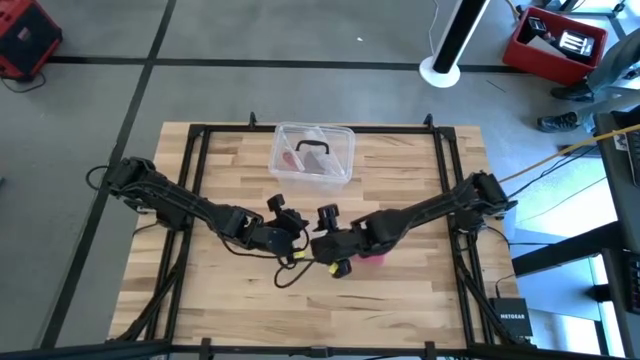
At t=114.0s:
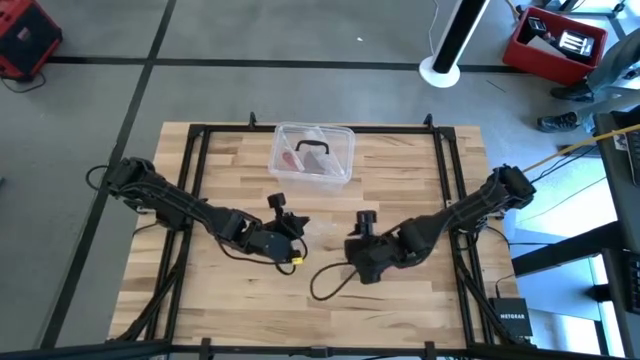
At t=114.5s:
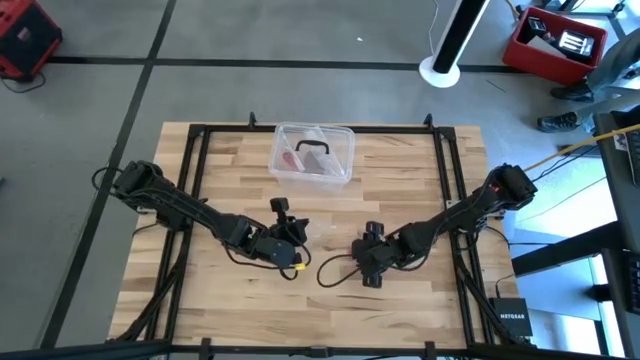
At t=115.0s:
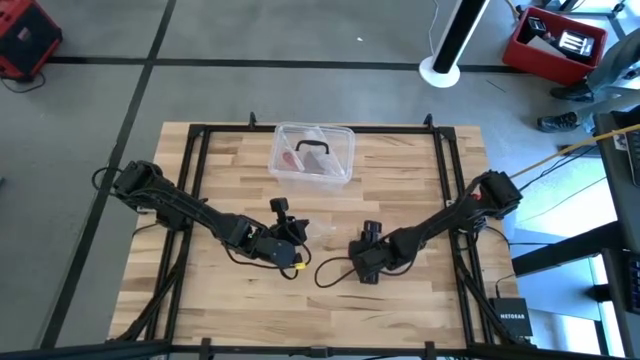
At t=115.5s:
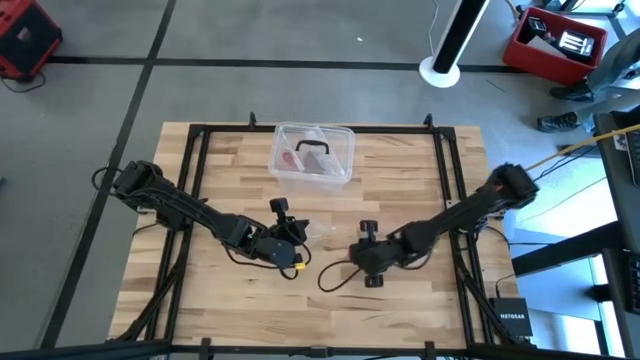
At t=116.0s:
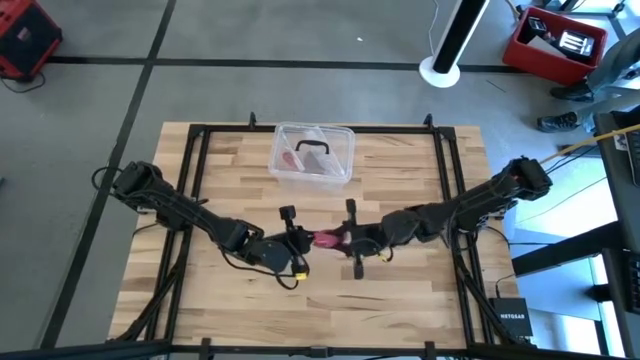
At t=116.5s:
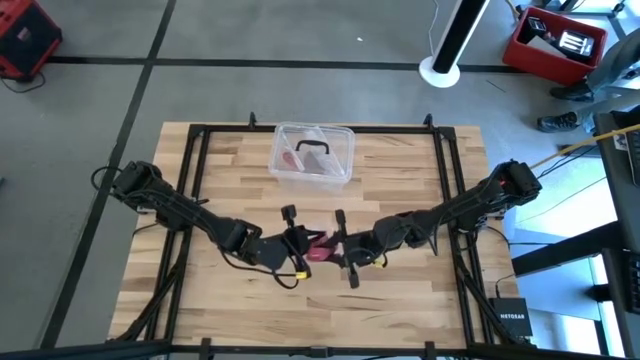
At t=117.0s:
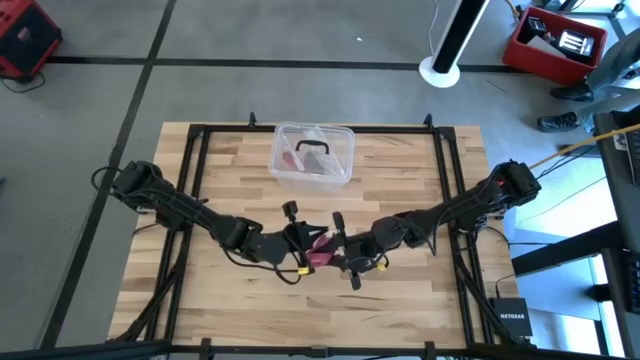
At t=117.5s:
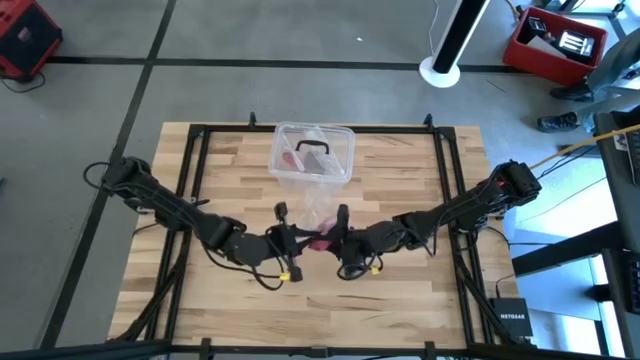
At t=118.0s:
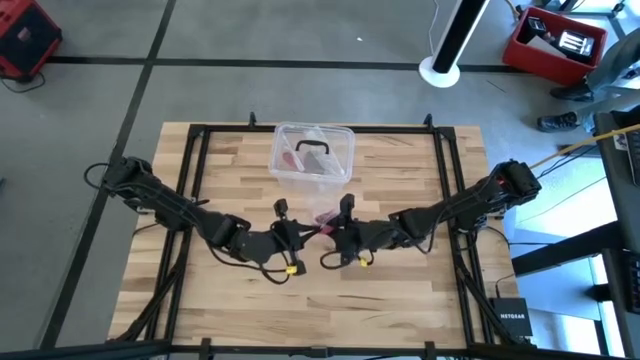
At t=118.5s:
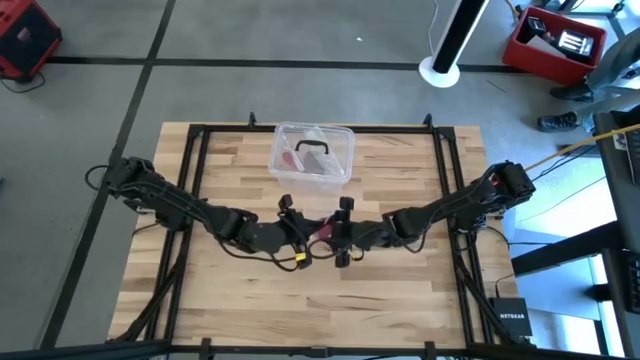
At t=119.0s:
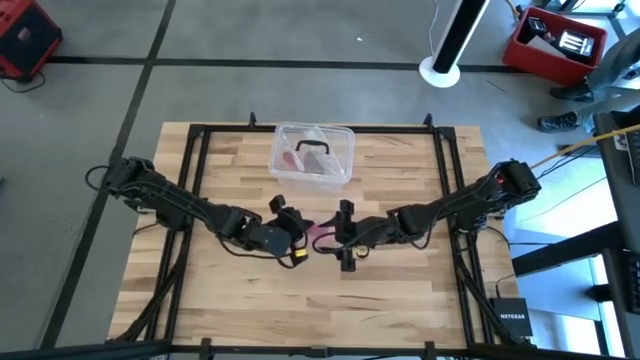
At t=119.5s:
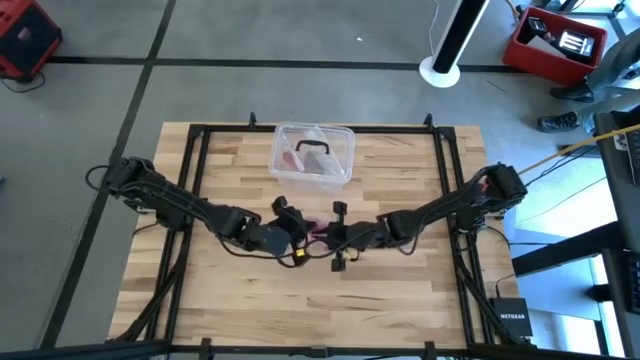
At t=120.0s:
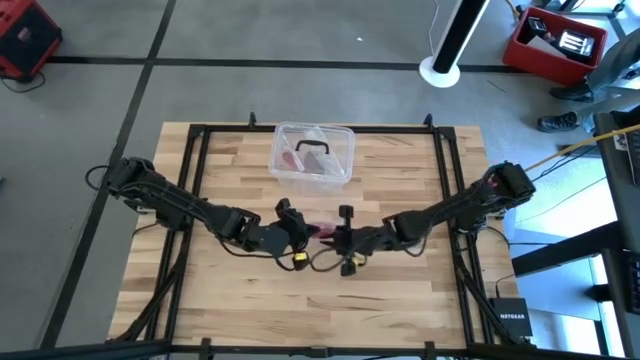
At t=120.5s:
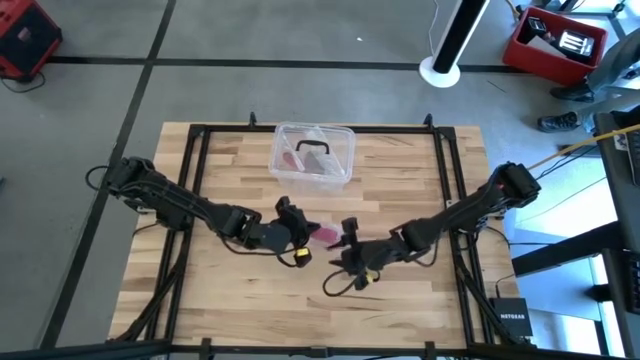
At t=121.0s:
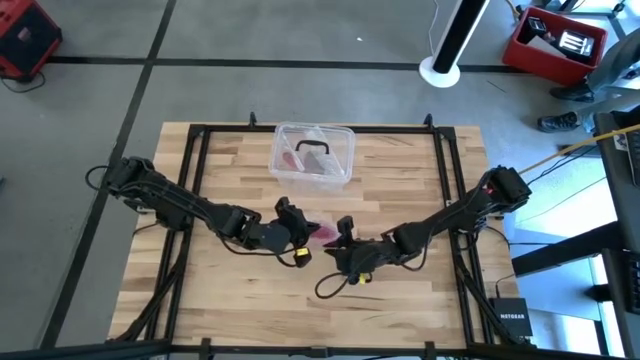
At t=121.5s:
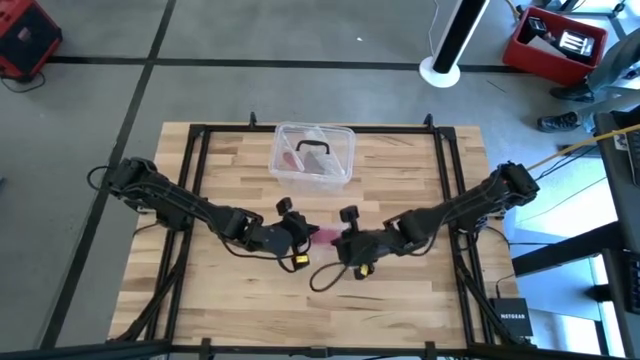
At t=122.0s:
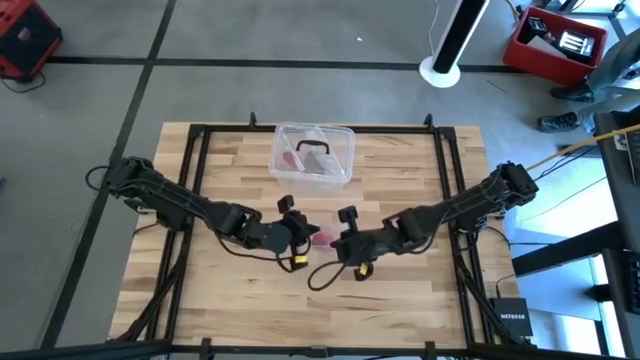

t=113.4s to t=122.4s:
Task: Roll bandage
Put the pink bandage into the transparent zip bag

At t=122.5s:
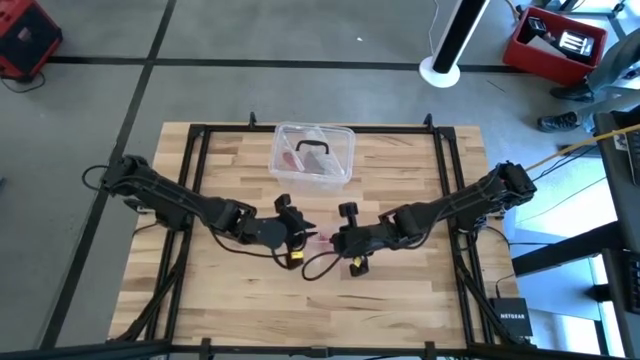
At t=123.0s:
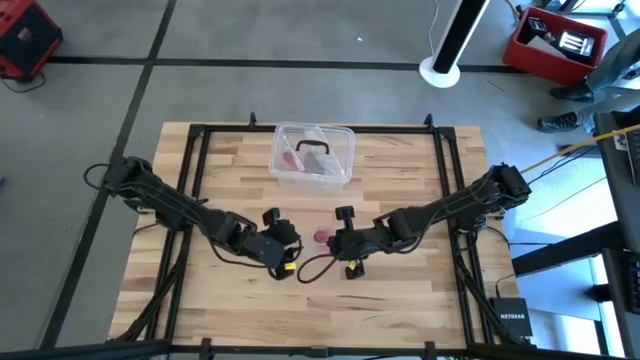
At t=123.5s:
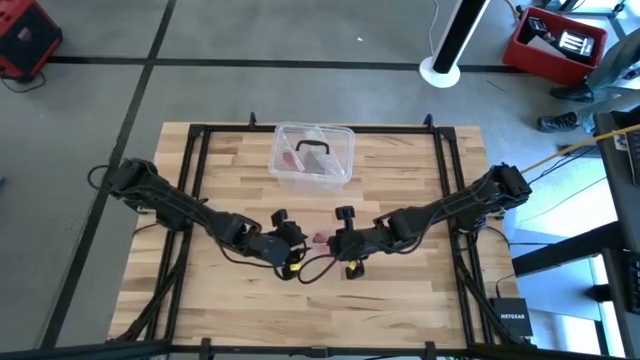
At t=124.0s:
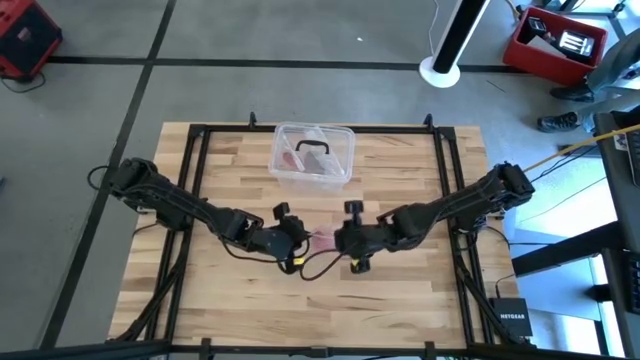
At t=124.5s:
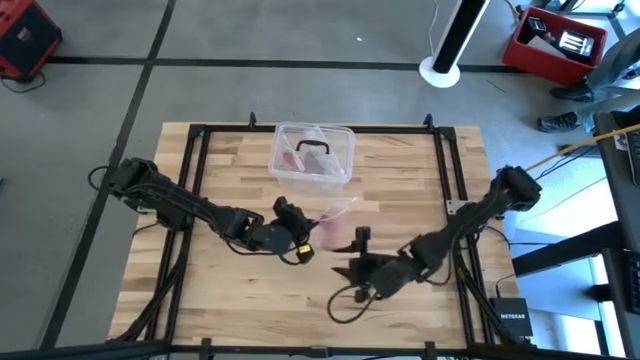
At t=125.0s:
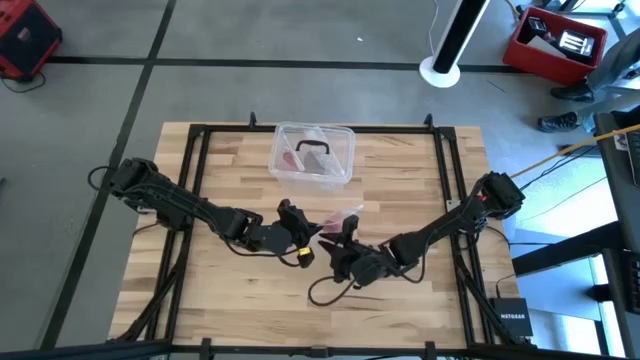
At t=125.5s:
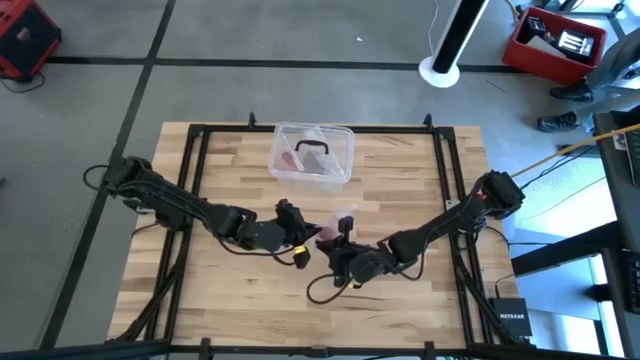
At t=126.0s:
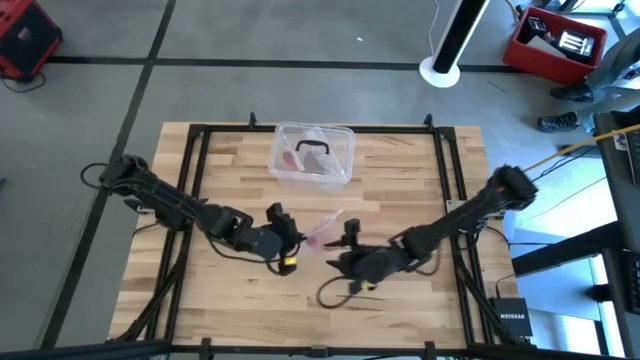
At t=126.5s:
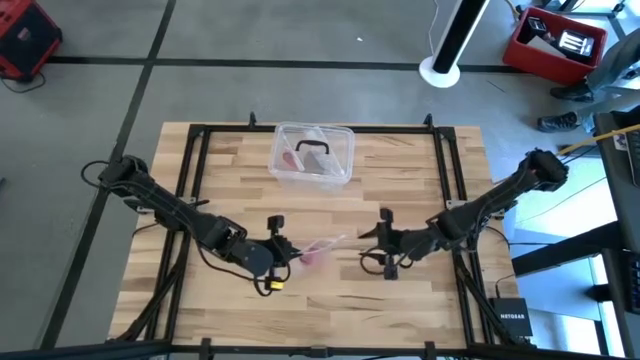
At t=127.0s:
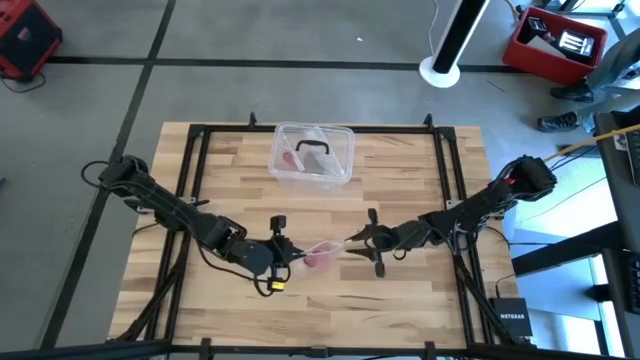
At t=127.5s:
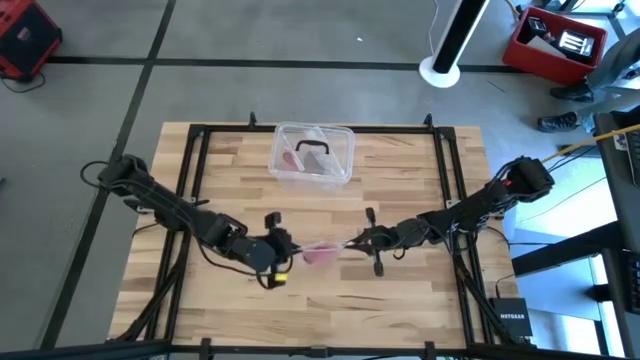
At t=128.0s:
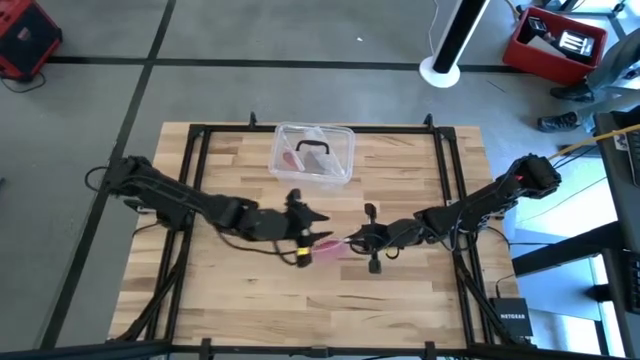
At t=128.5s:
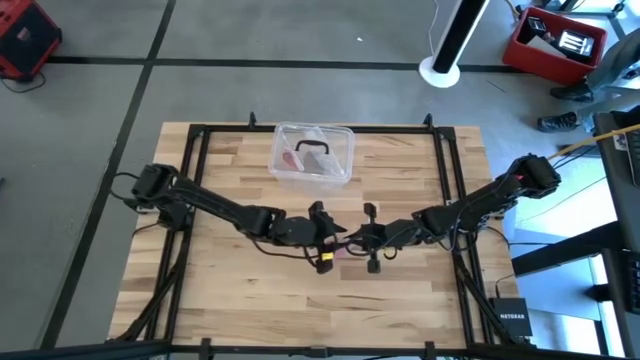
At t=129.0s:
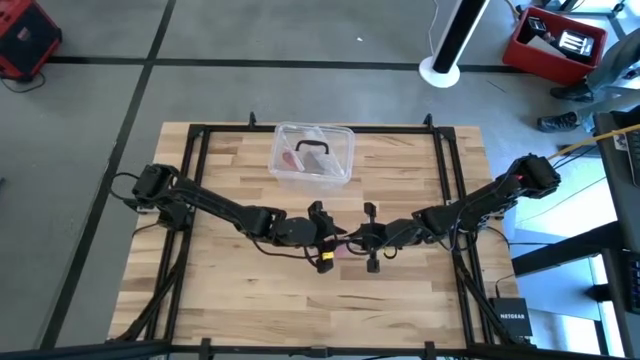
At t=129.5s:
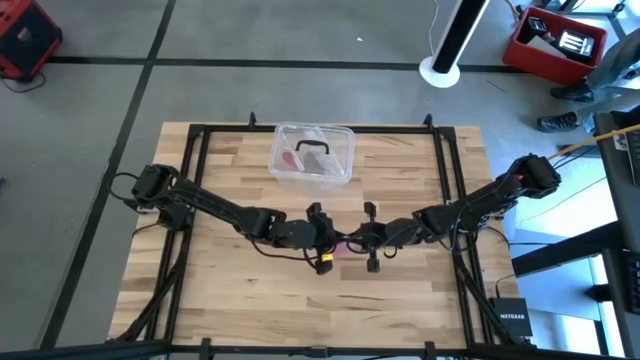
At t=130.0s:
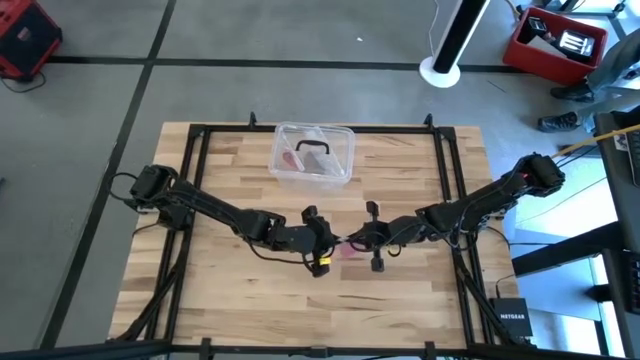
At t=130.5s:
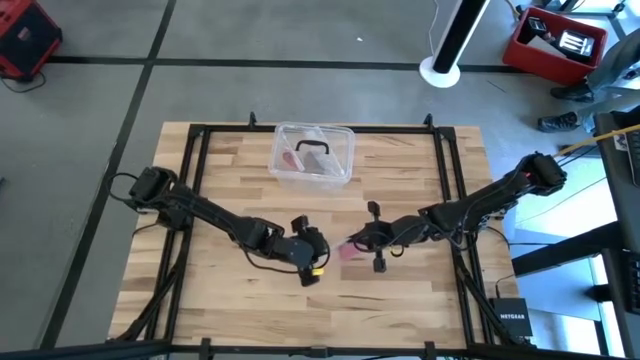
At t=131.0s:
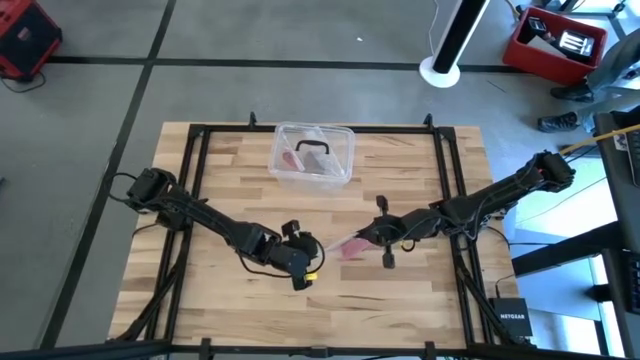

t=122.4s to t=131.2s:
Close the transparent zip bag

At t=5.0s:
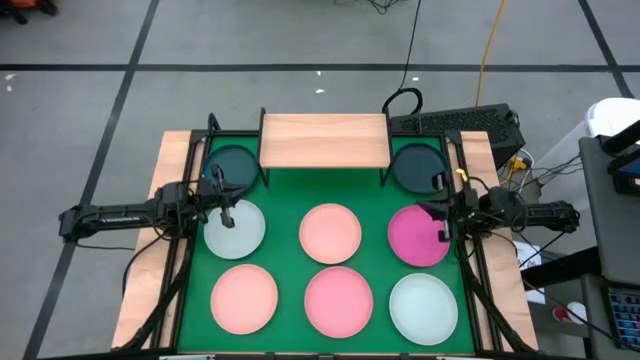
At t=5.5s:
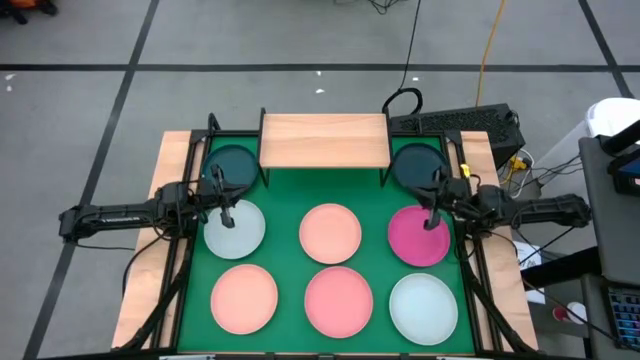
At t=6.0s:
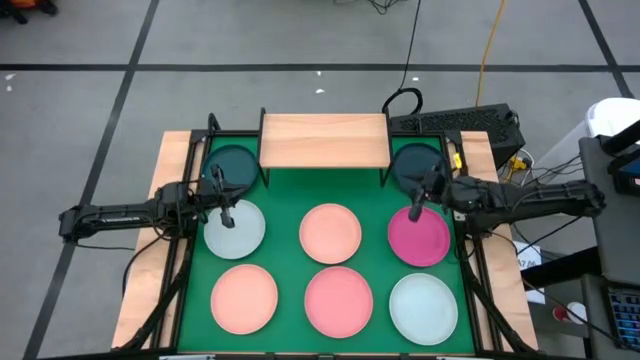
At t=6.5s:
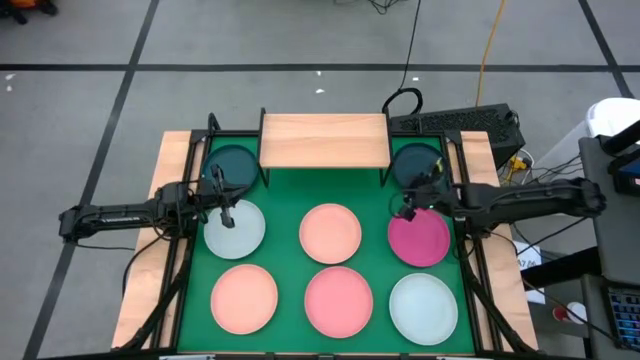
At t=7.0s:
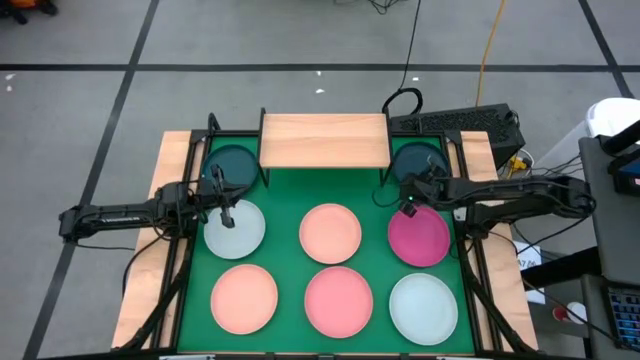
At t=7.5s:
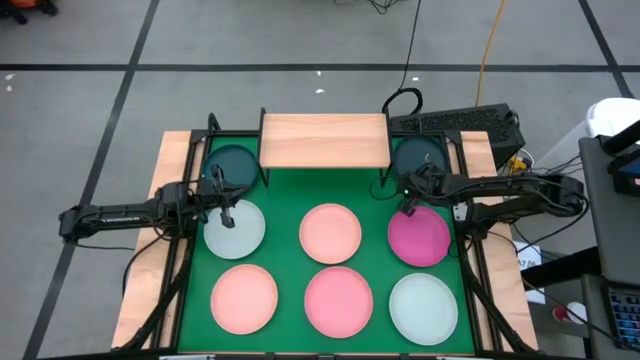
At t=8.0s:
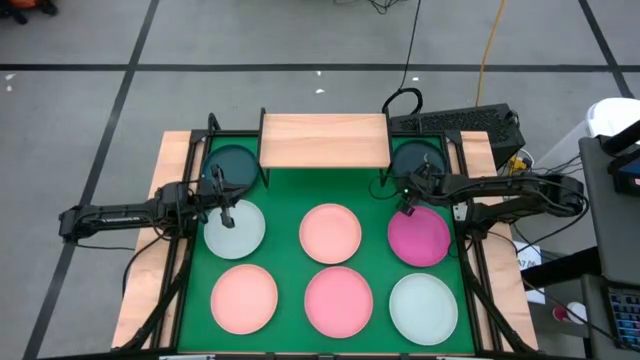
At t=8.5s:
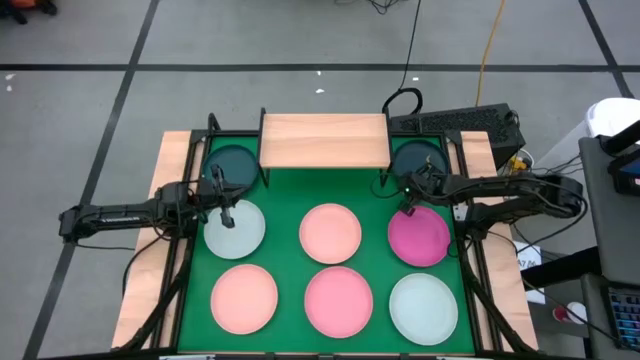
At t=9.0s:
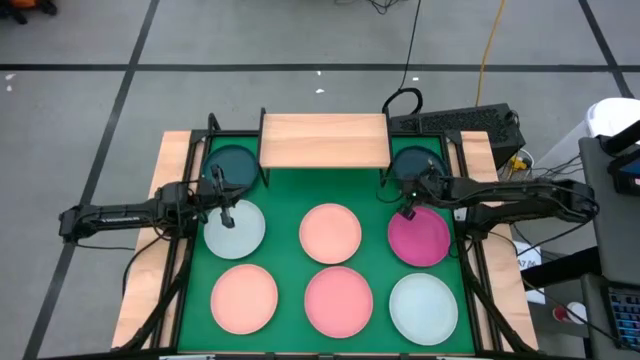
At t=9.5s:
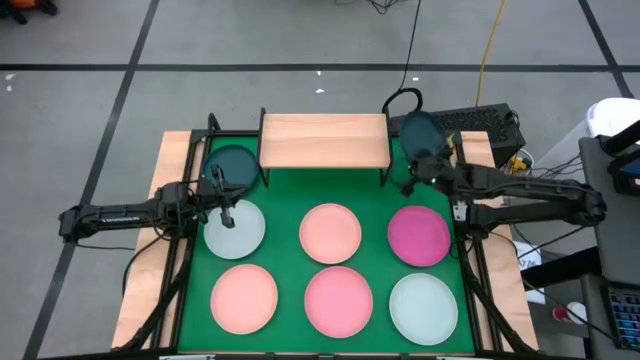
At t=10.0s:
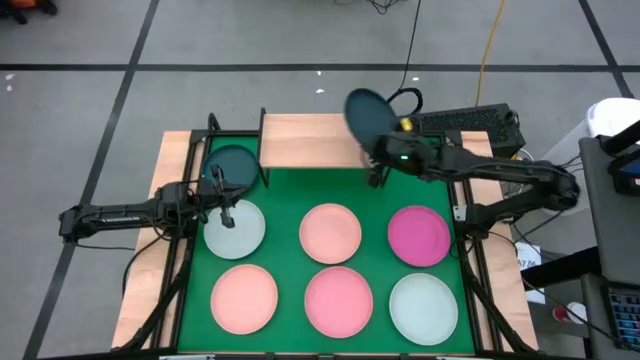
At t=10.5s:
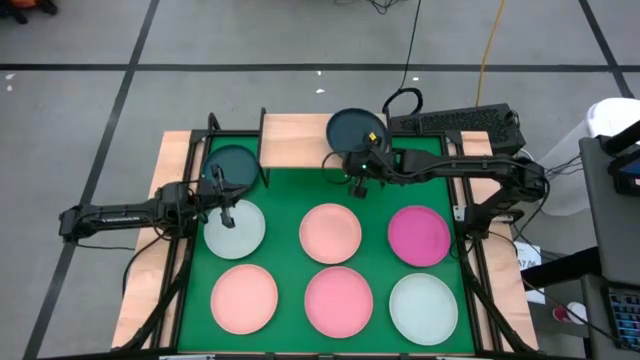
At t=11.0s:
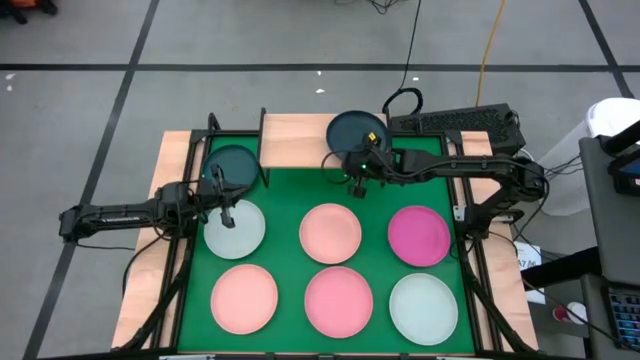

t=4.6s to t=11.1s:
Task: Place and stack plates onto a shelf
Put the right black plate on the shelf
